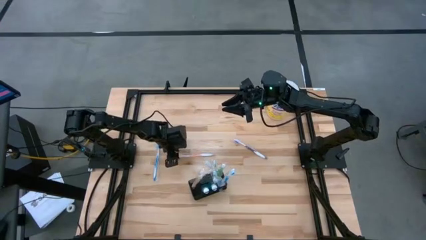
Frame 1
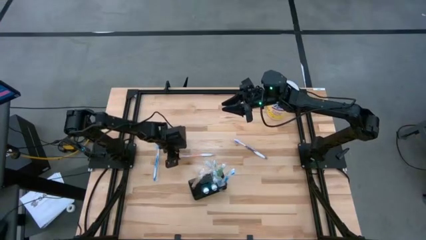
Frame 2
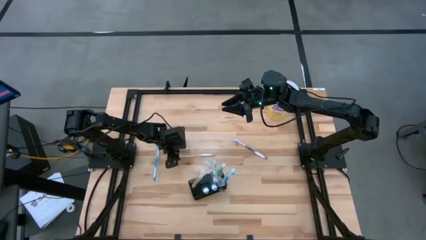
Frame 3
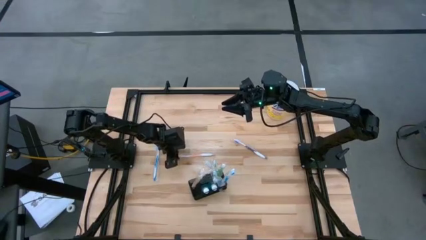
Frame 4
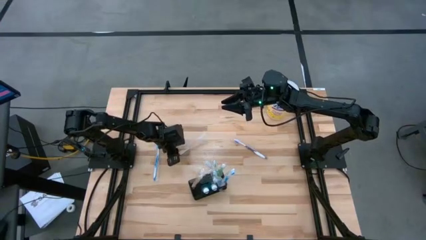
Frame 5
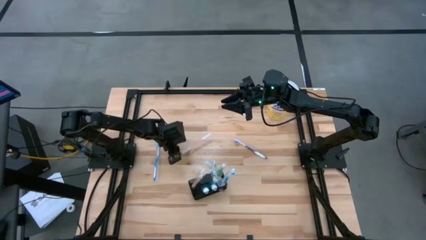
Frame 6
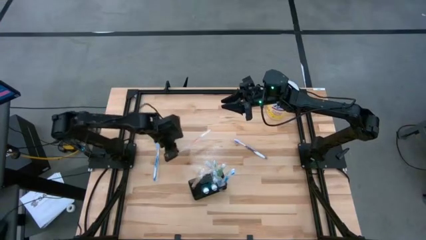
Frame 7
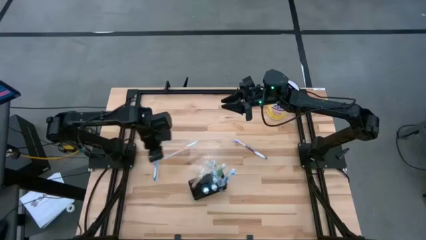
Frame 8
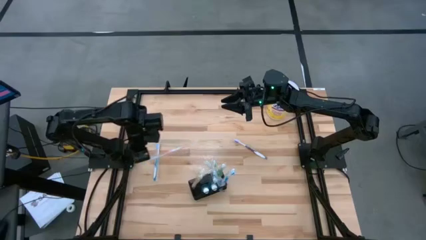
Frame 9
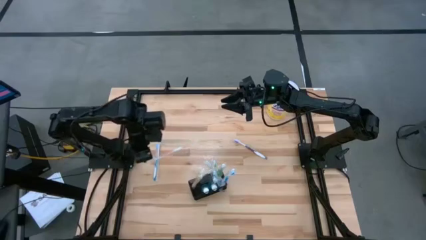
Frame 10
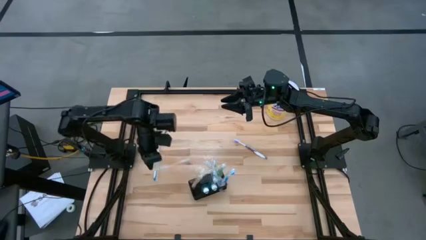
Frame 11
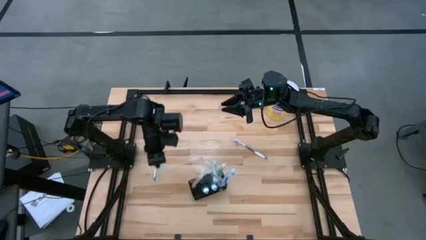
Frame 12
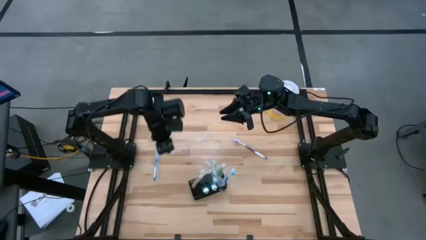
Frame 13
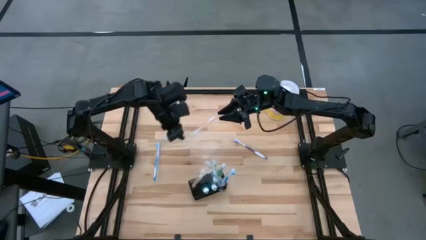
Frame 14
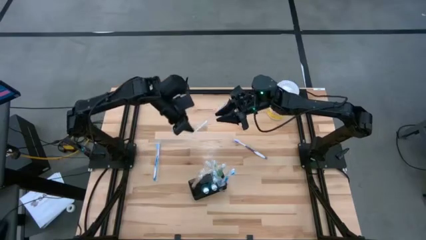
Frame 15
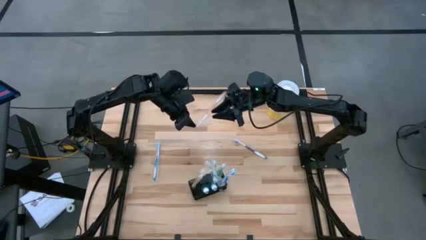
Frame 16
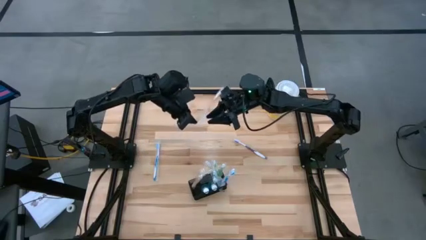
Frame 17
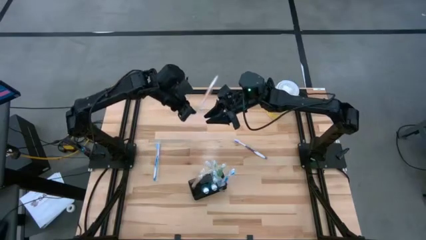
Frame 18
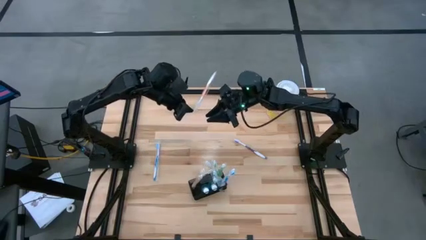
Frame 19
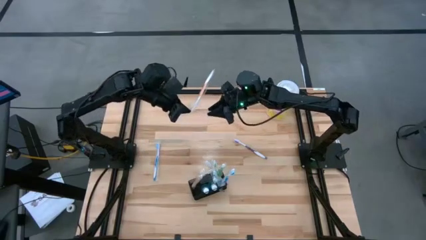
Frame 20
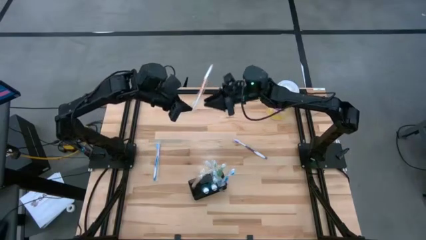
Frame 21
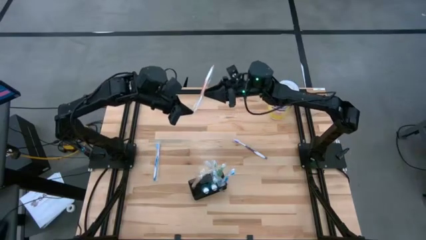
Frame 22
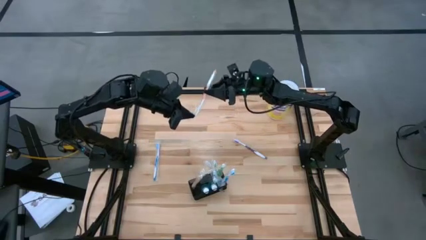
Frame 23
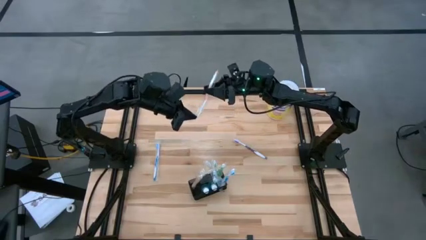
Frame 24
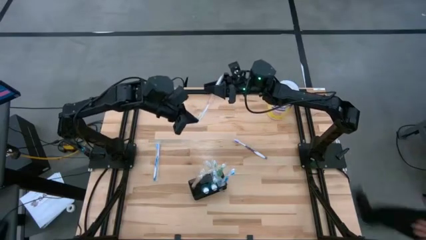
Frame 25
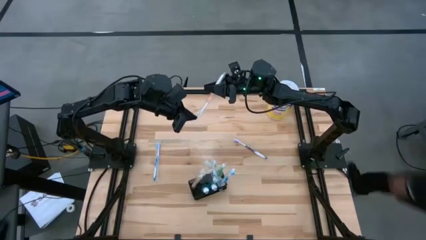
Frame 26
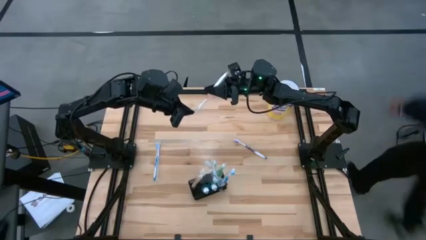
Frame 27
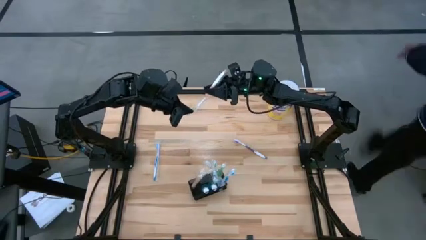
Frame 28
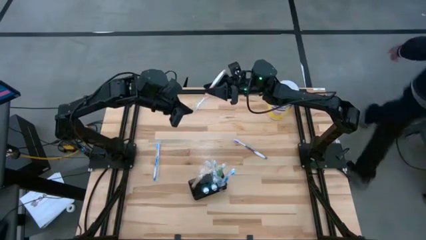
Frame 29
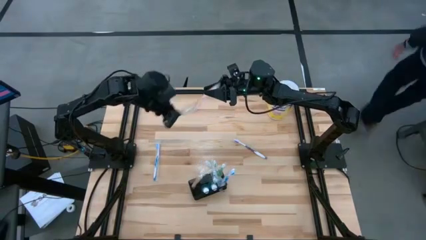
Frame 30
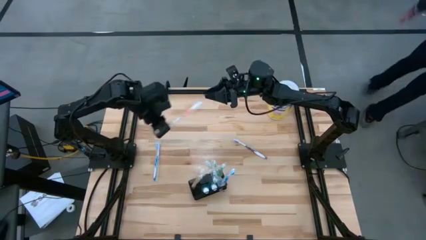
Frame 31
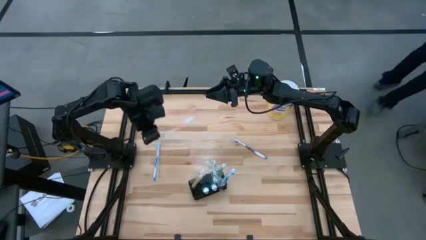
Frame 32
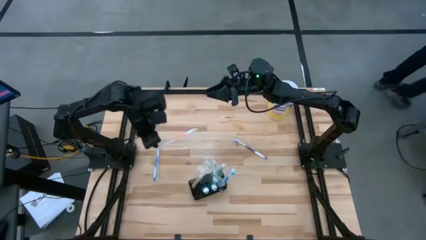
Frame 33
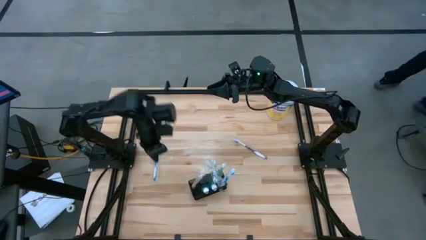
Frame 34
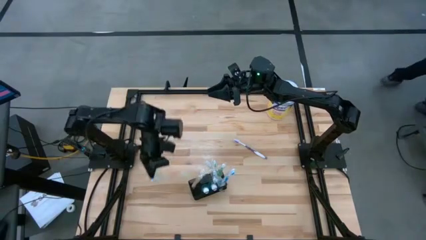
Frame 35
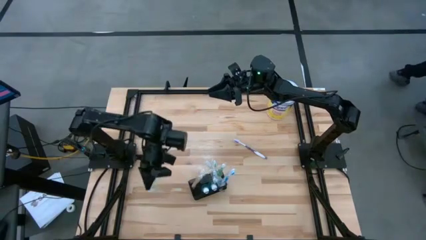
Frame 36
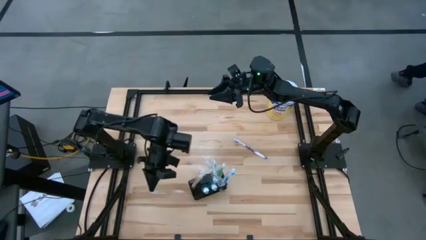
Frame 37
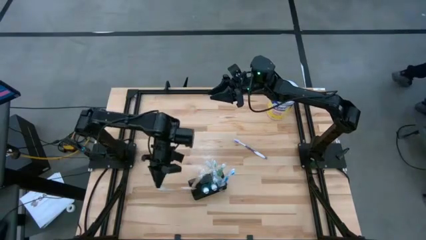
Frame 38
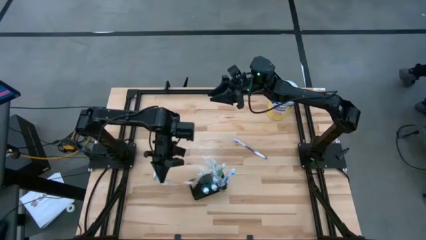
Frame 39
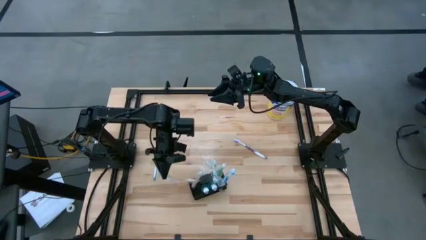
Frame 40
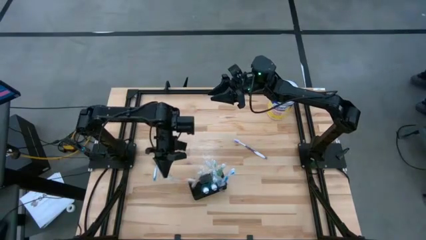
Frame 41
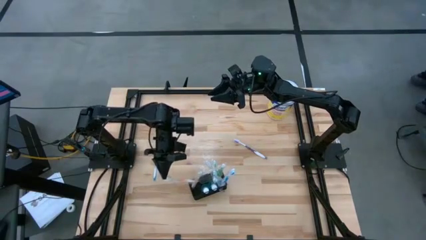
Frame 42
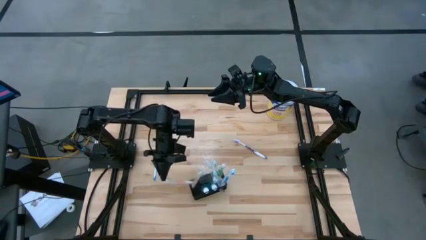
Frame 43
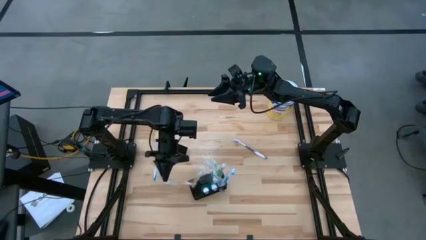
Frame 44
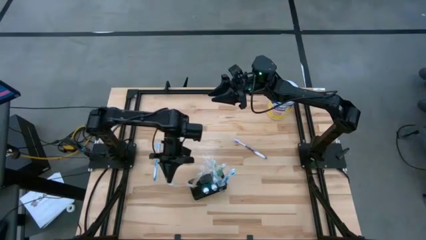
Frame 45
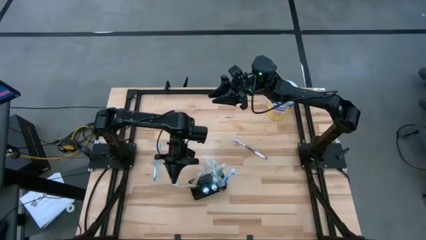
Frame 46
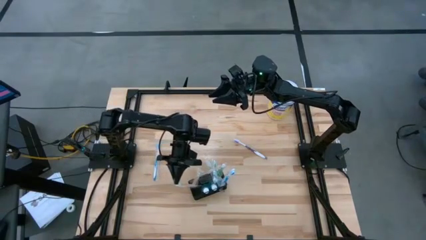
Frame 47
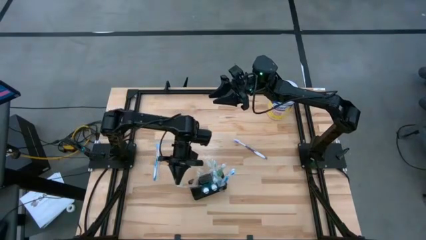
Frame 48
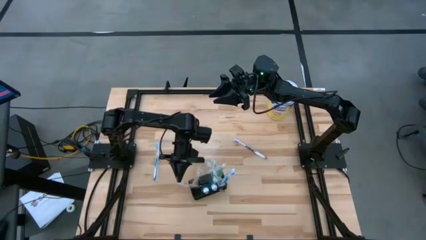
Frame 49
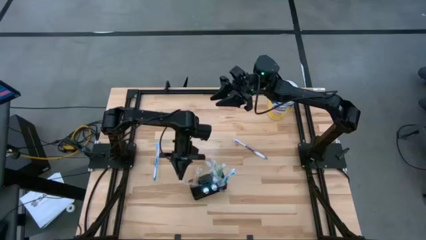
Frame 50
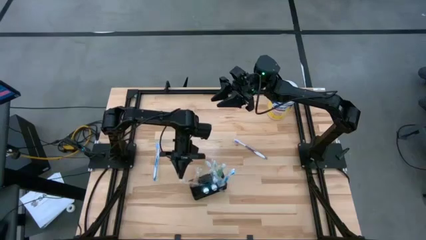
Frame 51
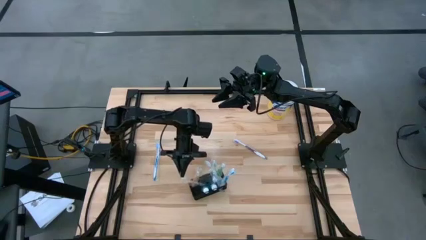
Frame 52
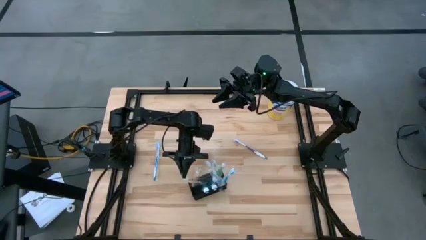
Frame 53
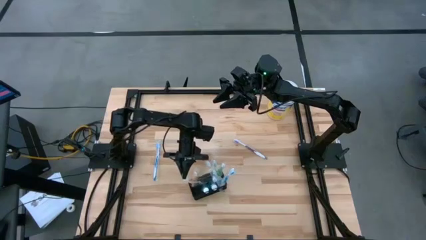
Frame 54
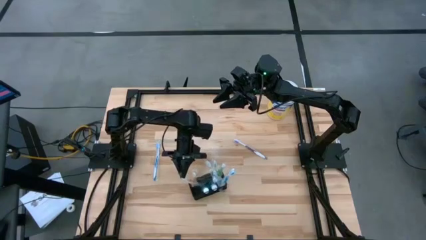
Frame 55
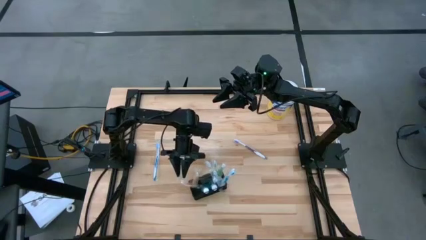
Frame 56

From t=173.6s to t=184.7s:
Task: Pick & Place toothbrushing station
Put the orange toothbrush into the mesh organizer

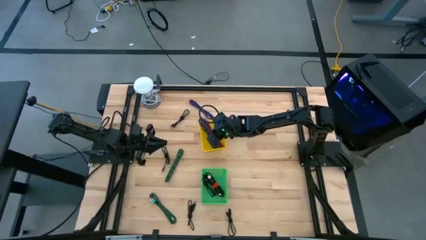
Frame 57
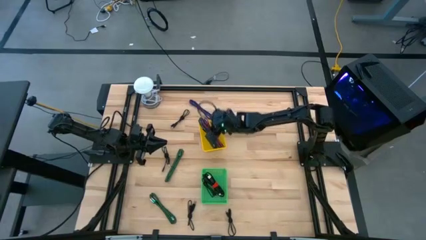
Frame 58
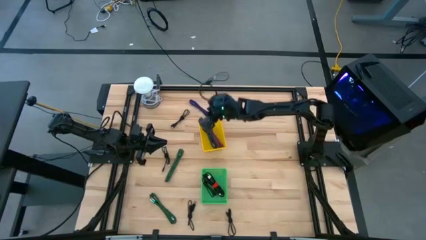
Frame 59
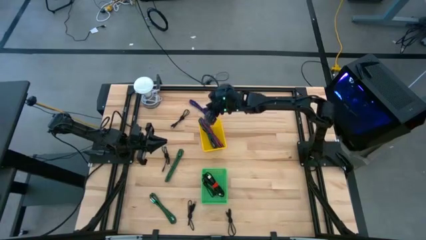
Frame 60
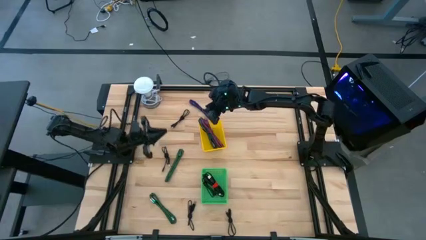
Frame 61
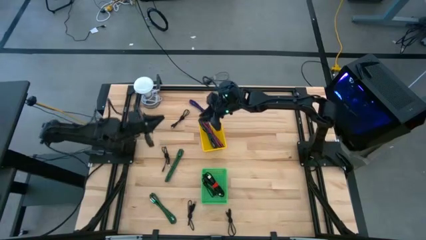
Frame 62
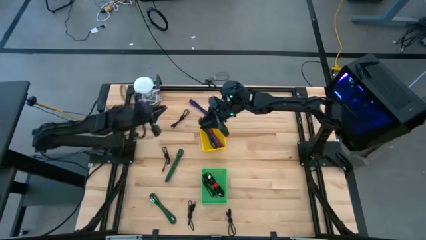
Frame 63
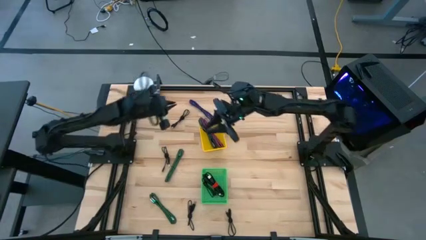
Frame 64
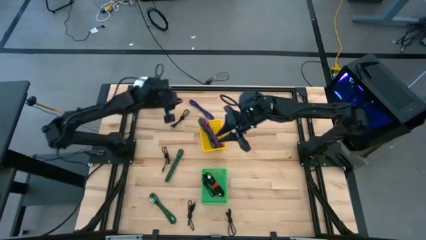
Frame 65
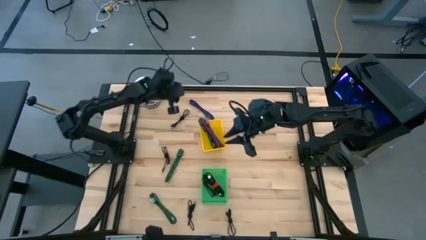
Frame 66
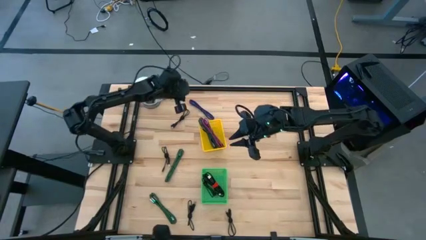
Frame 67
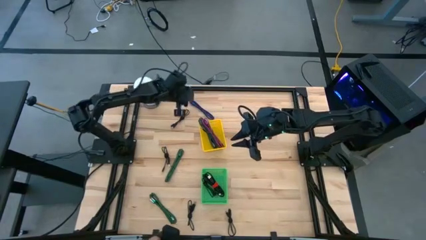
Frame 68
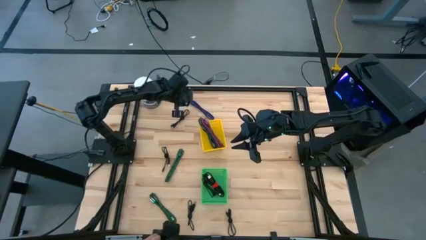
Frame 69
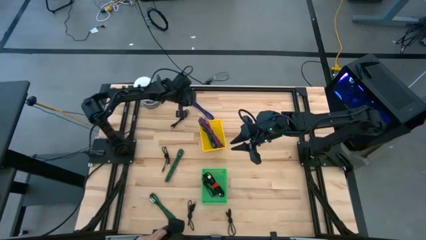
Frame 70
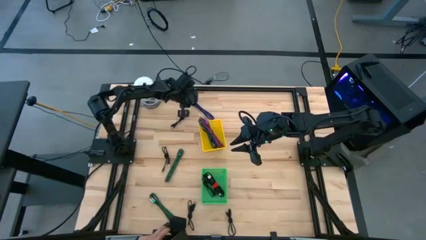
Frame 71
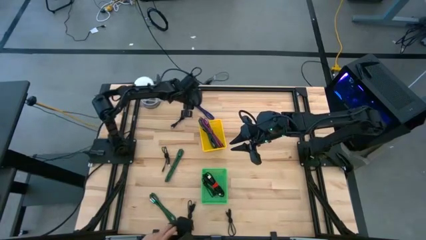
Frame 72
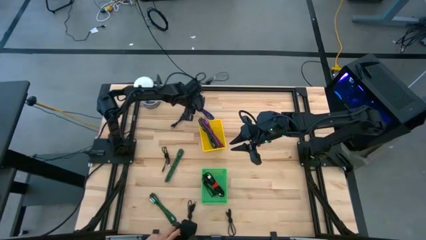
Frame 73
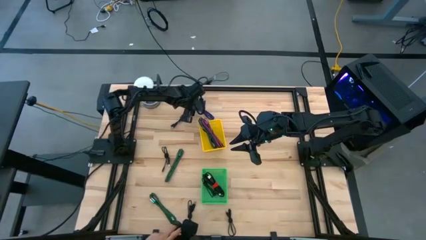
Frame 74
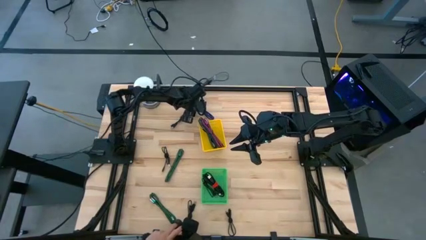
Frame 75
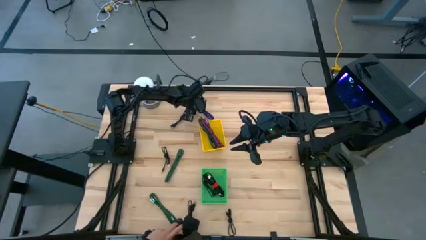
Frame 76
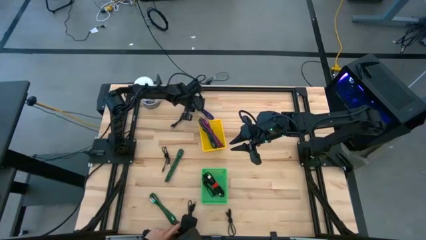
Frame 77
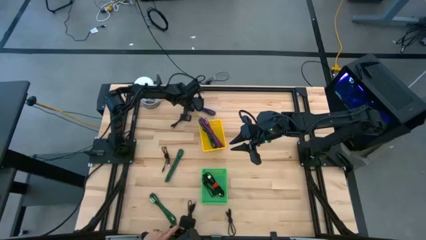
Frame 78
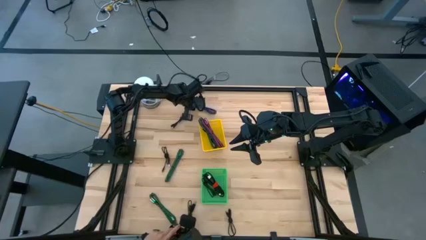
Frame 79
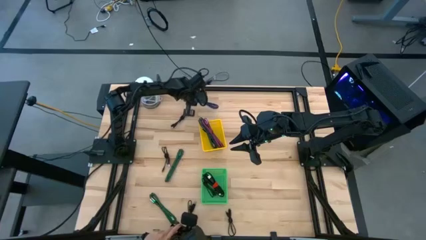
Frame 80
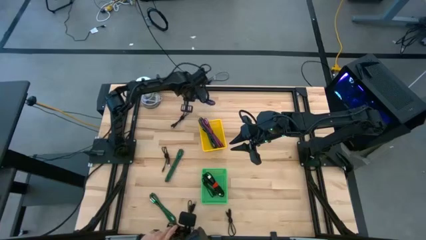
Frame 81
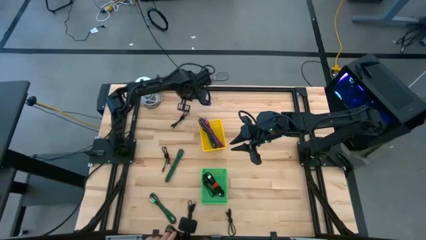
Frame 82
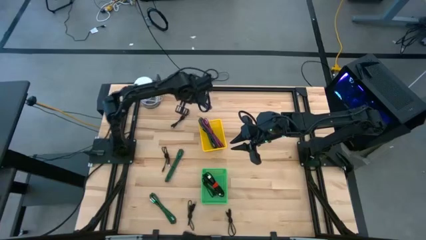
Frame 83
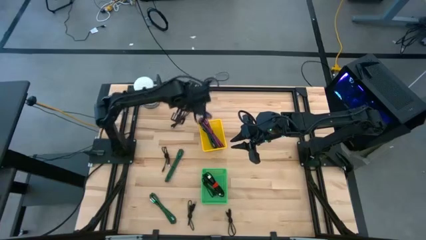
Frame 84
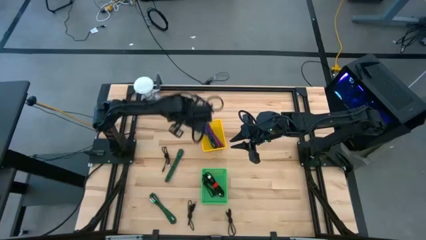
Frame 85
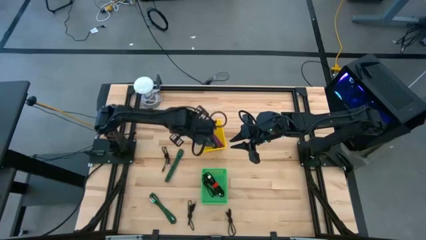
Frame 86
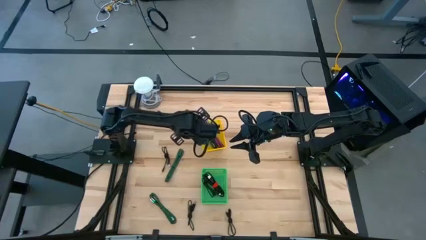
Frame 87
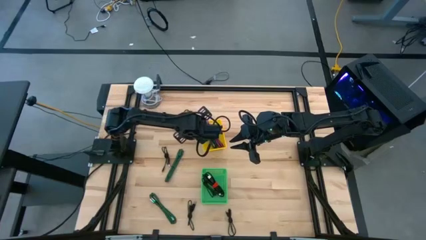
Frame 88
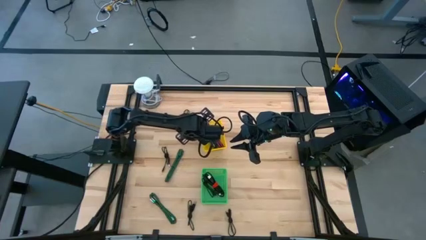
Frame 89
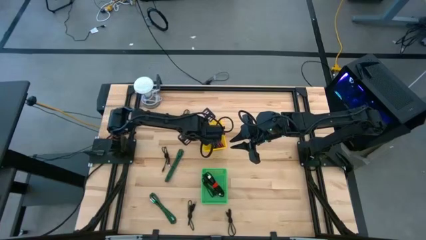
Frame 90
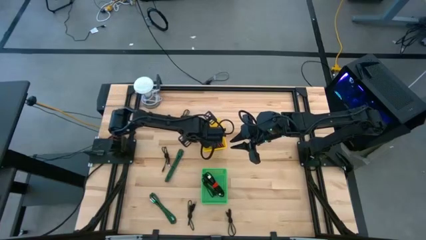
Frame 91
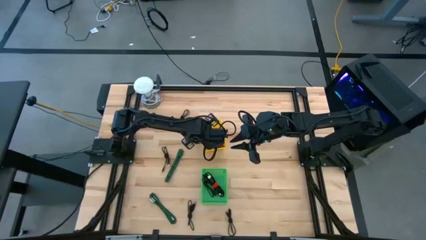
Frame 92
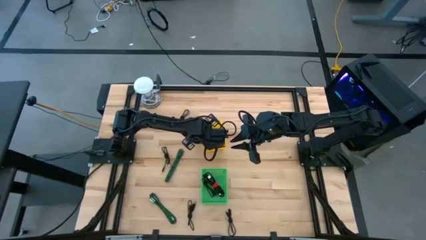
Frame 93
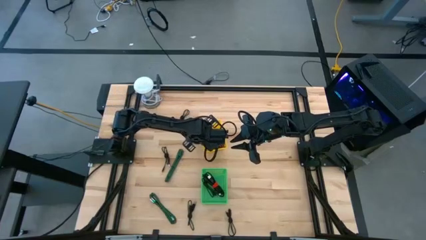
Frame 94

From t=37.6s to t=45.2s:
Task: Pick & Place USB Port
Put the black and blue charger cable into the yellow bin
